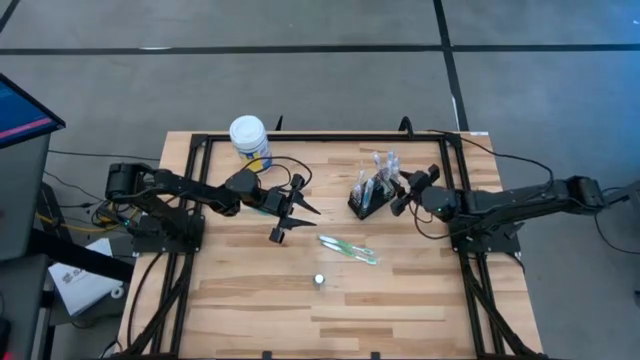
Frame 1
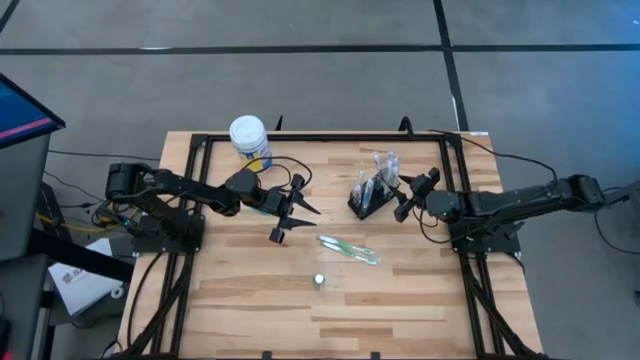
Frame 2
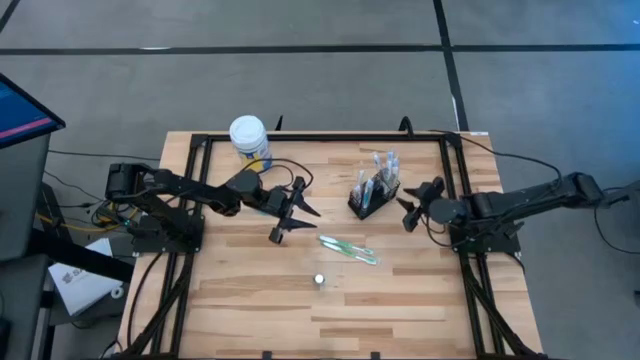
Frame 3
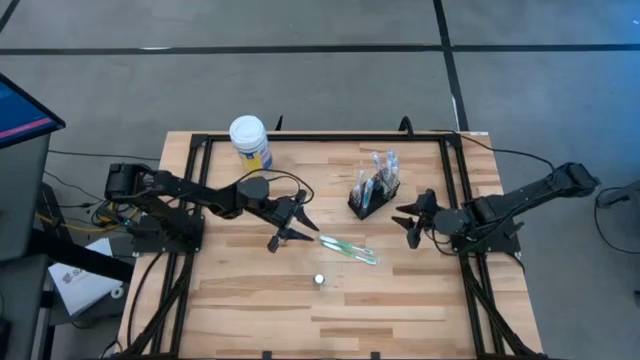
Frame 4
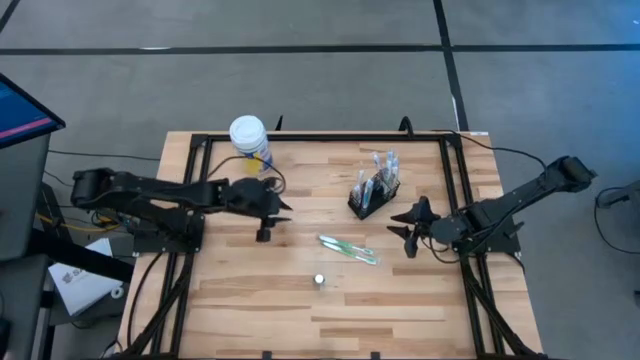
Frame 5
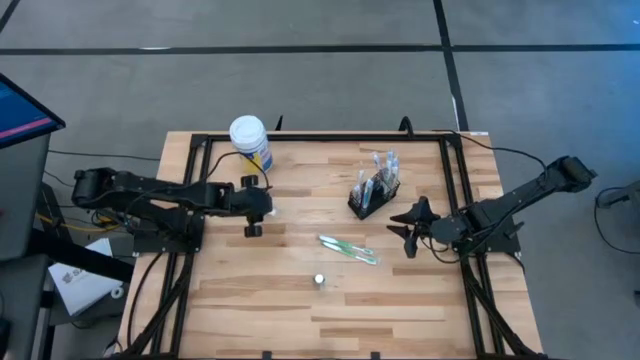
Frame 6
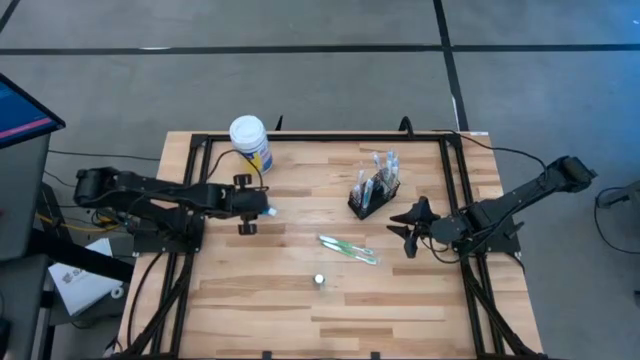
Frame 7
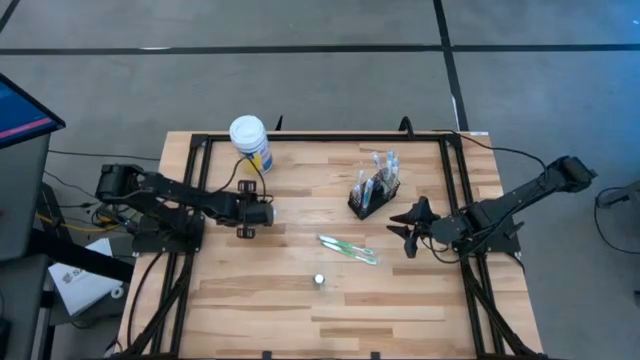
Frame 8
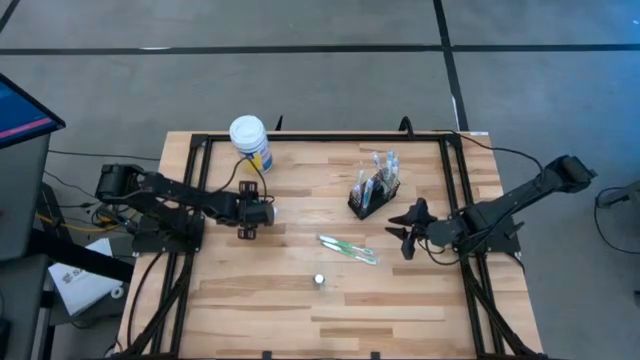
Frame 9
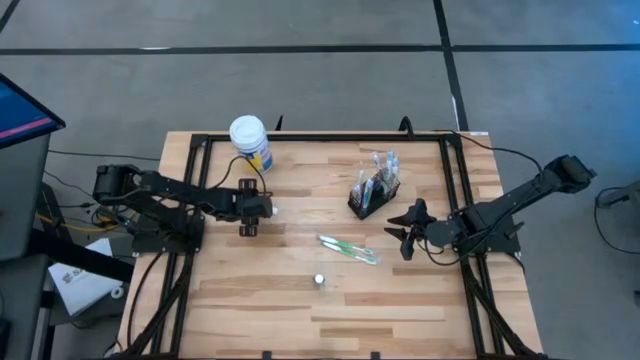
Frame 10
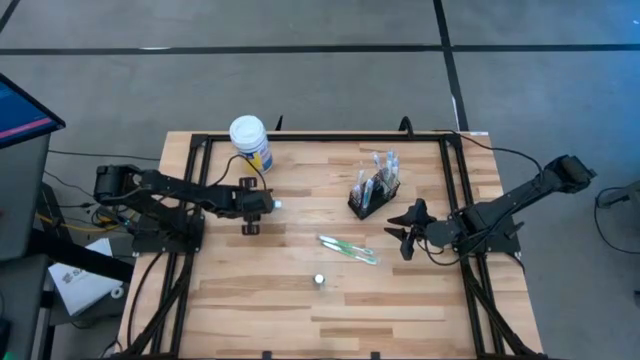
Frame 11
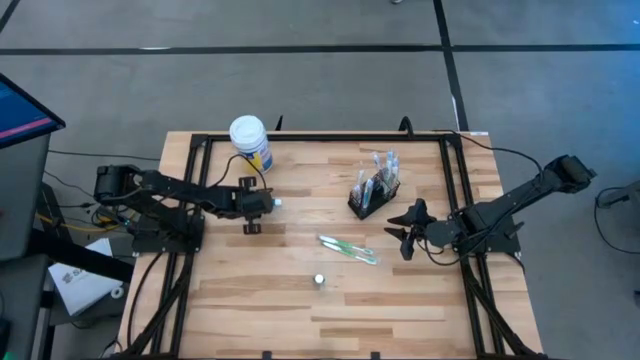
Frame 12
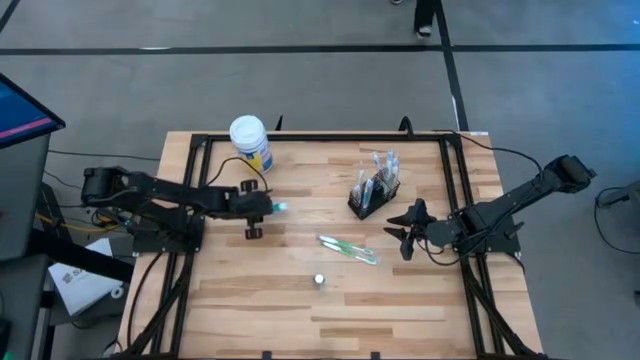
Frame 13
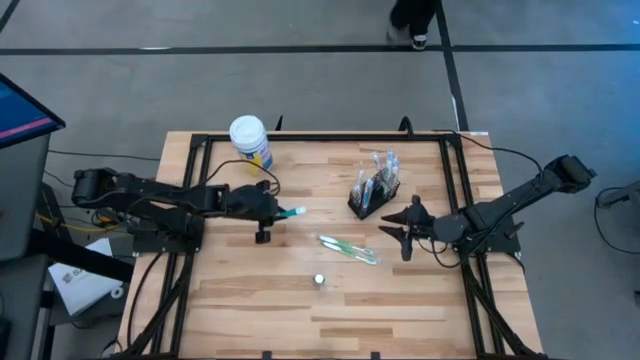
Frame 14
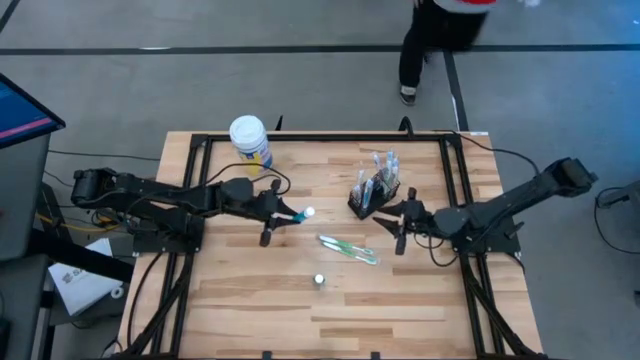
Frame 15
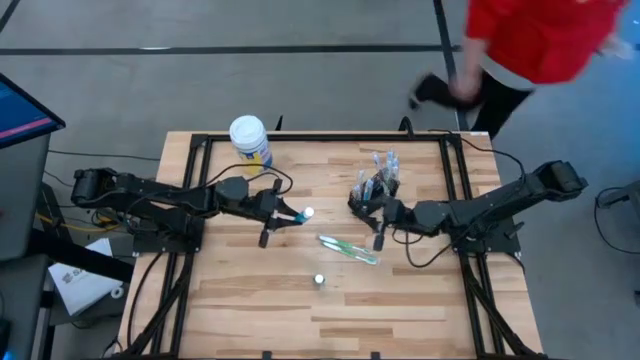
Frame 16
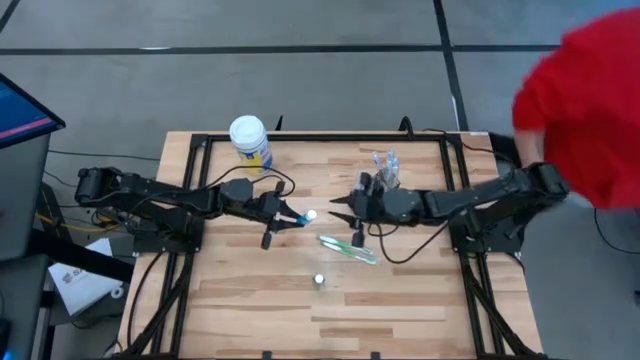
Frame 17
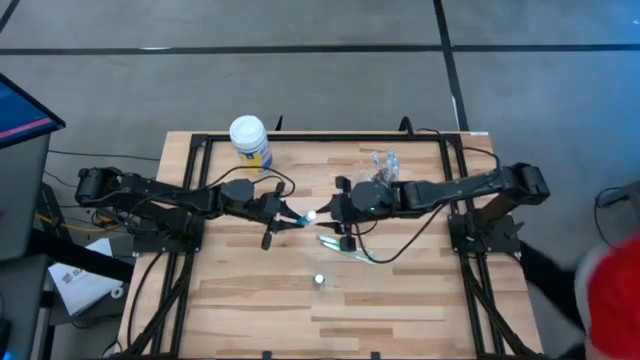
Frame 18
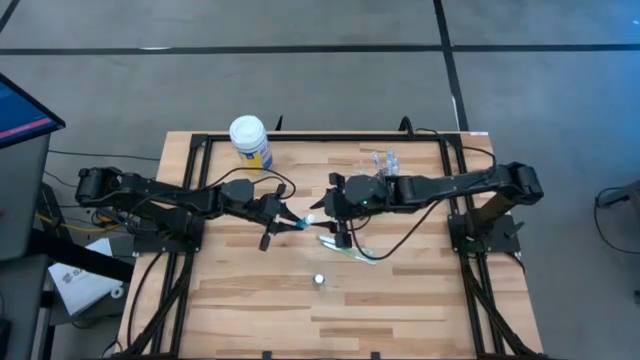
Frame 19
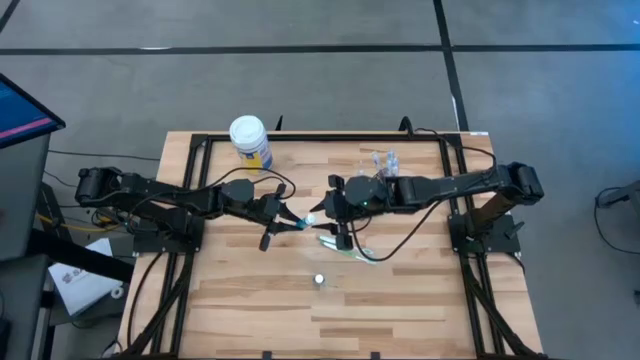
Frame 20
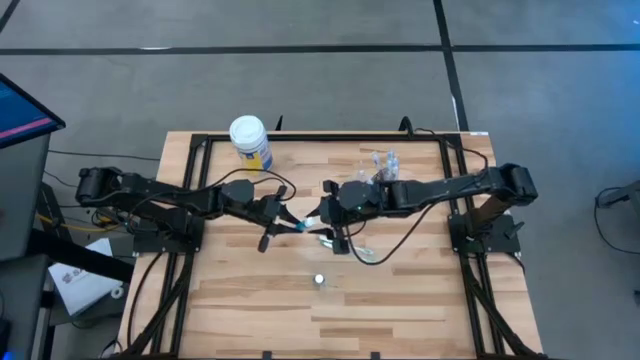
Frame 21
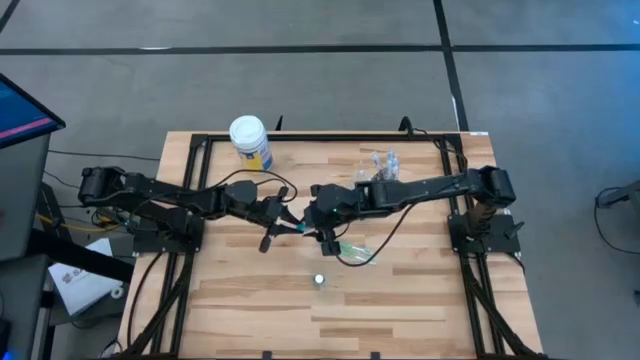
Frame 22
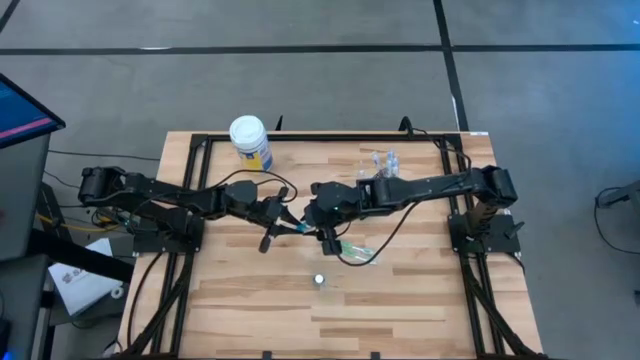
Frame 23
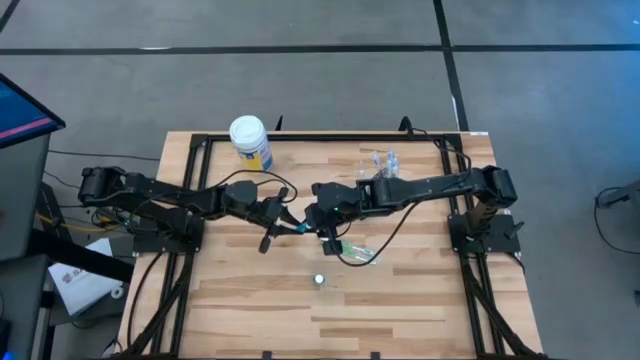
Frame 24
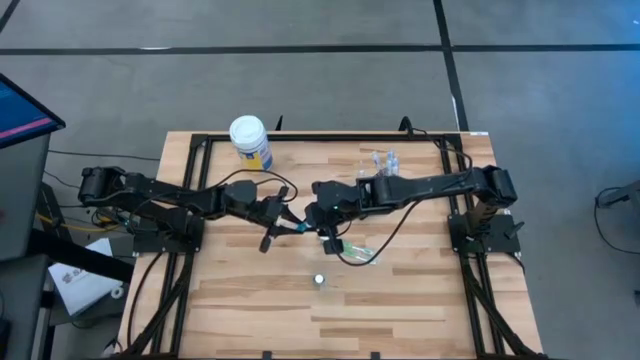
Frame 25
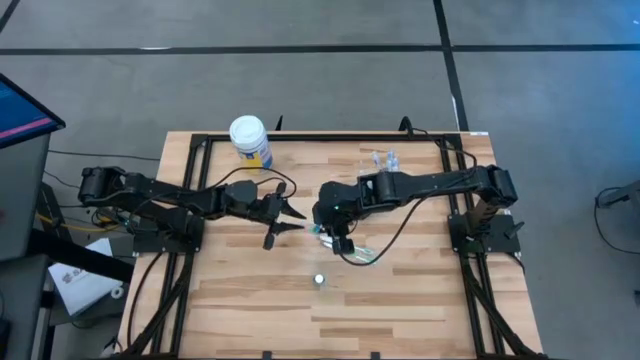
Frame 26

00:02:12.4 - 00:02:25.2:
Task: Pick & Place toothbrushing station
Put the blue mouthwash into the mesh organizer

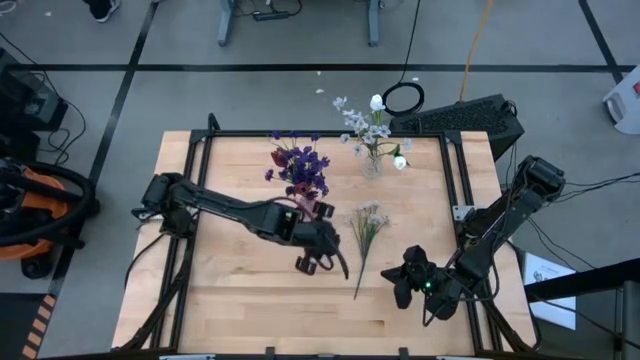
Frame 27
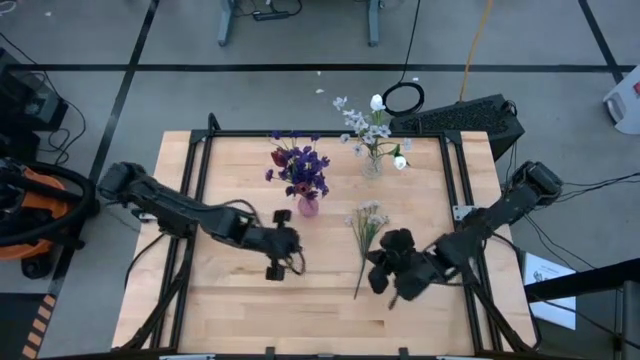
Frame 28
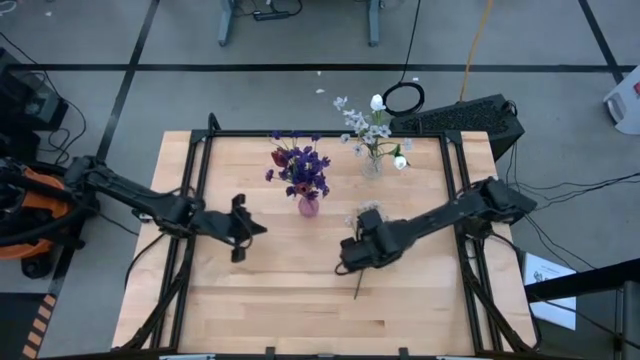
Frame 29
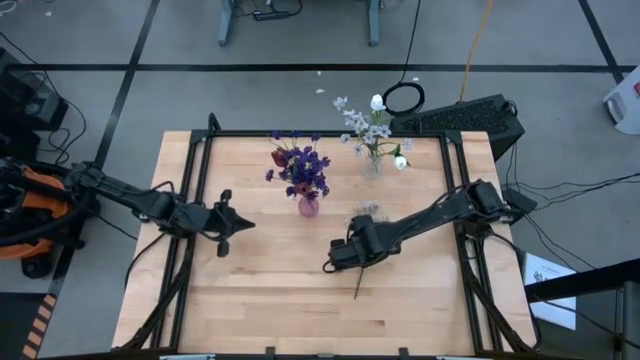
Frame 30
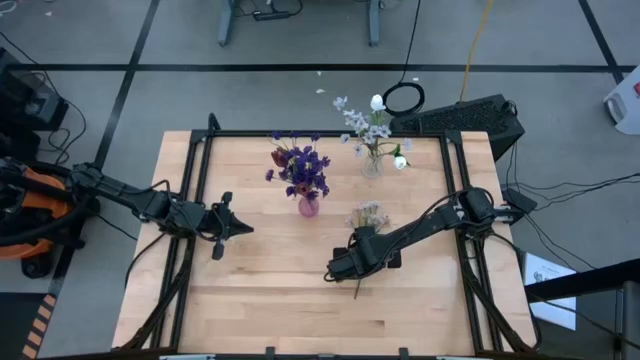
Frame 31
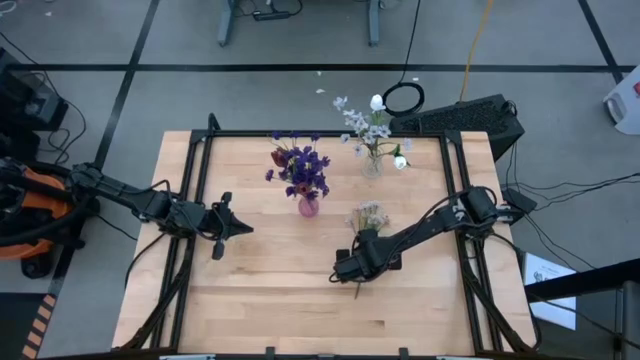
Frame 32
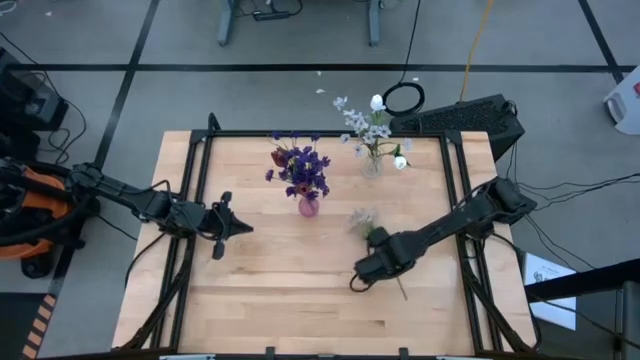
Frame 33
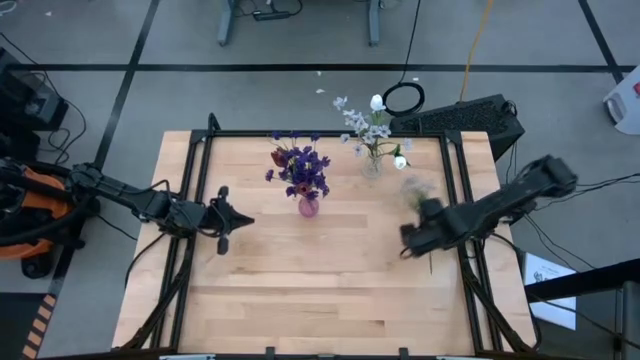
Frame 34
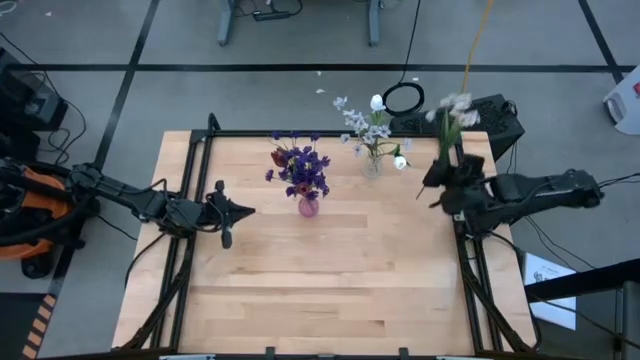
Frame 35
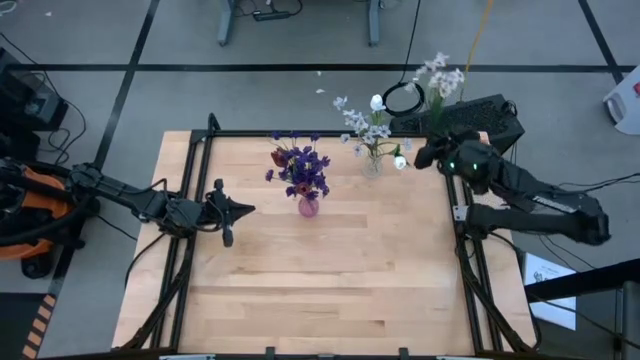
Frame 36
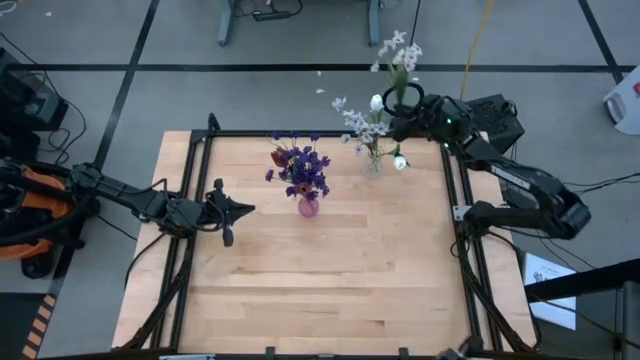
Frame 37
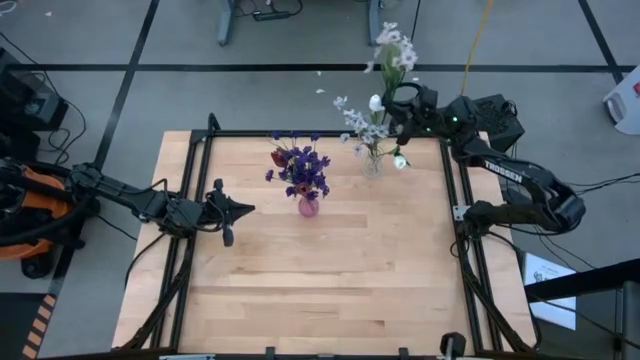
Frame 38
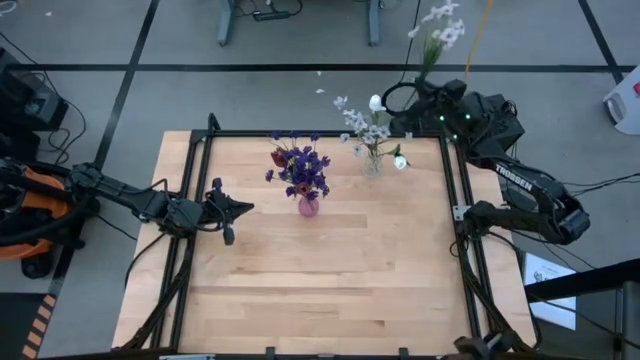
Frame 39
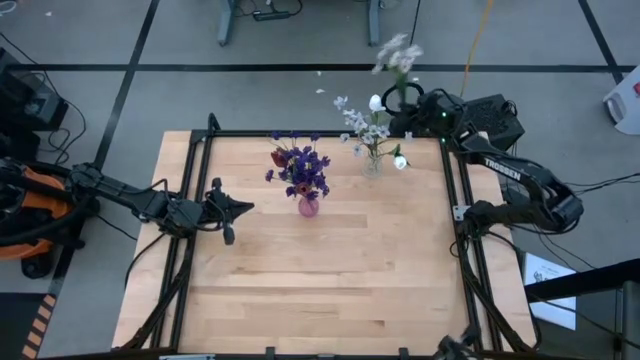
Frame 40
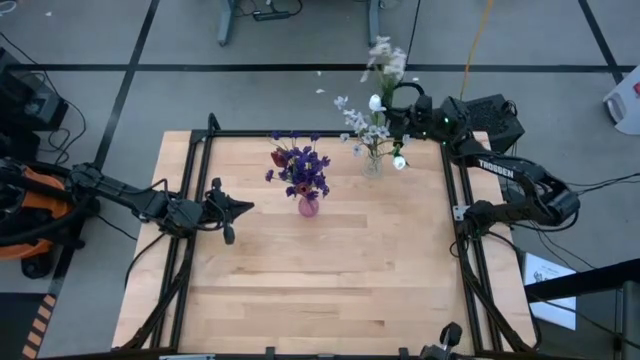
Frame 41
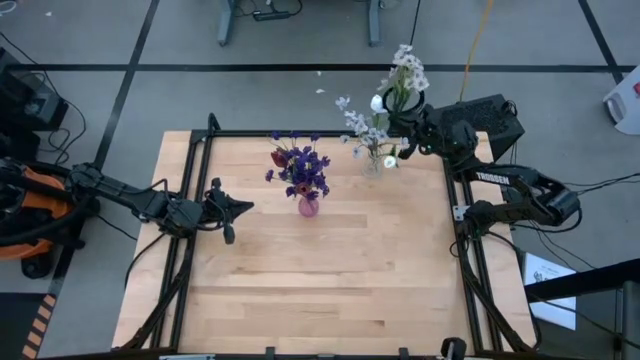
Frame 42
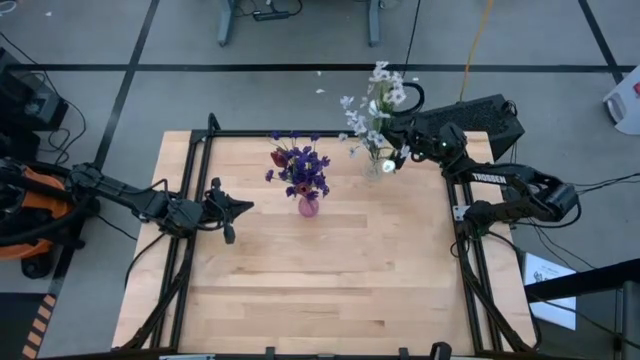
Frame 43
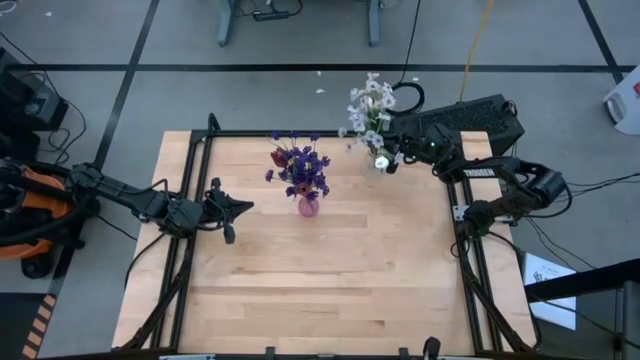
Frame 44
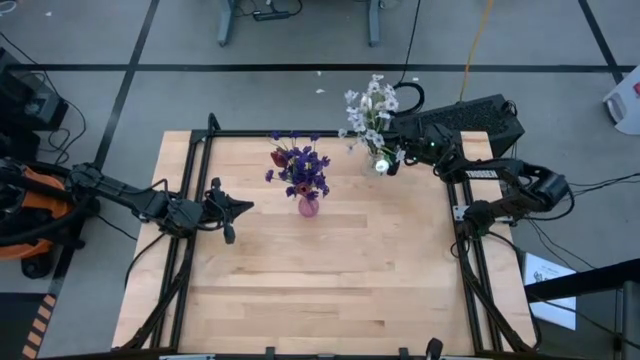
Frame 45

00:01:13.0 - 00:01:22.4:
Task: Sort flowers into vase by color
Put the white flowers into the transparent vase
